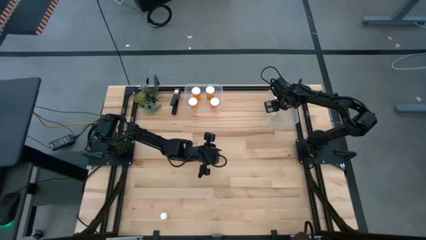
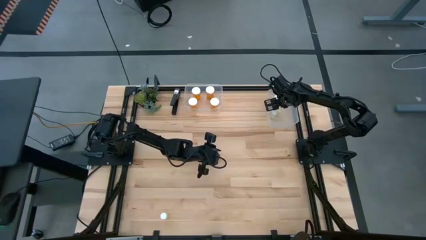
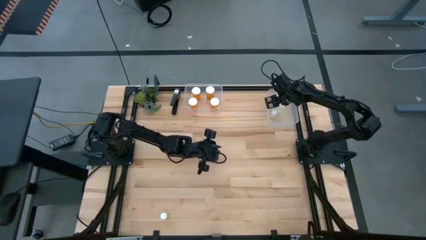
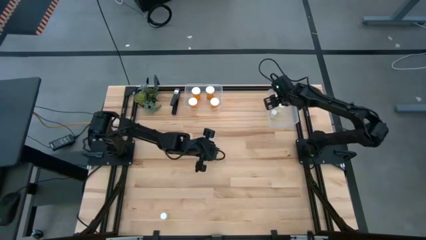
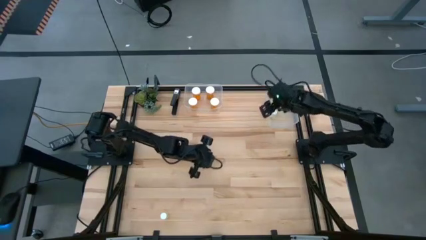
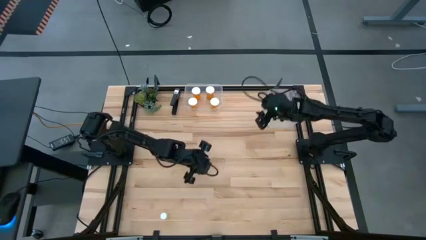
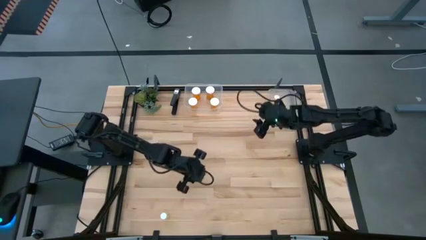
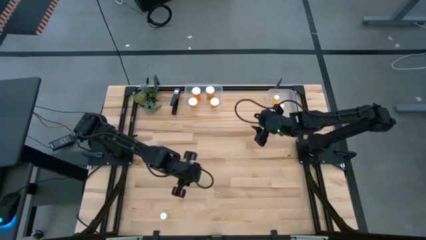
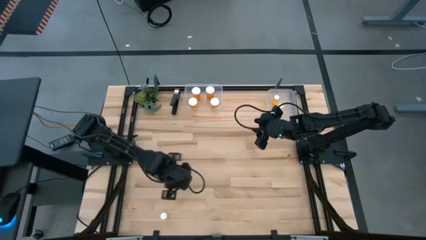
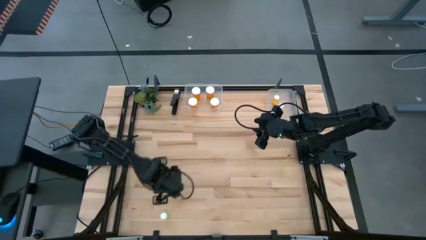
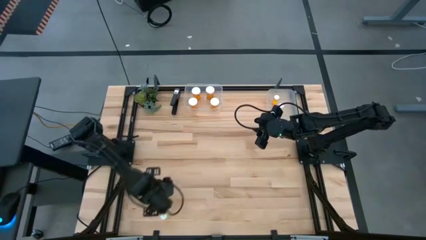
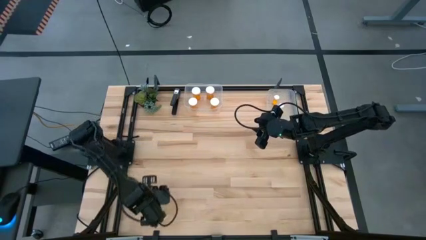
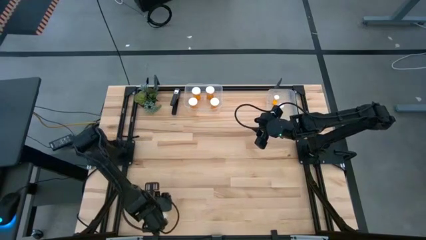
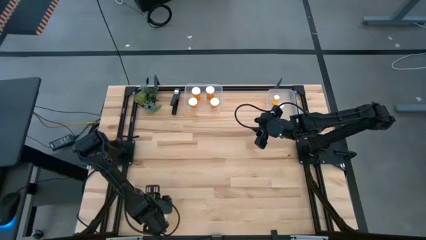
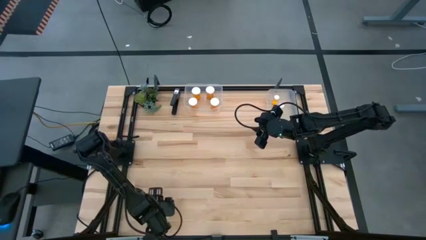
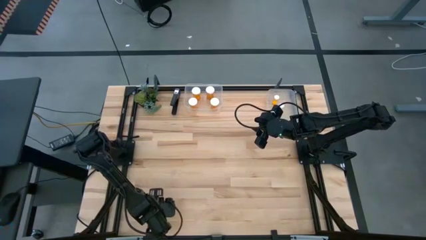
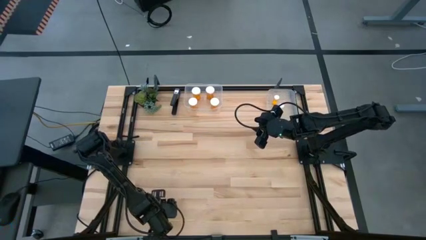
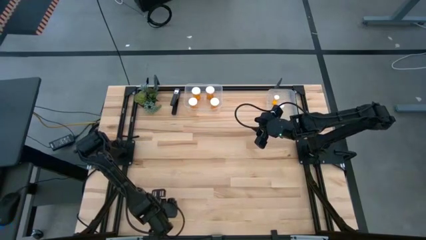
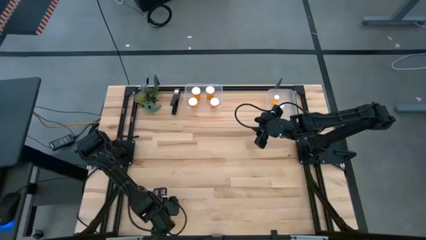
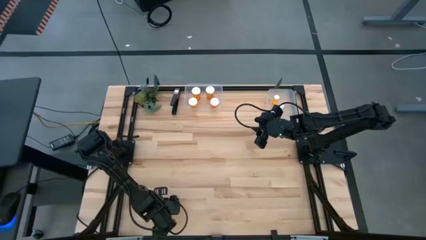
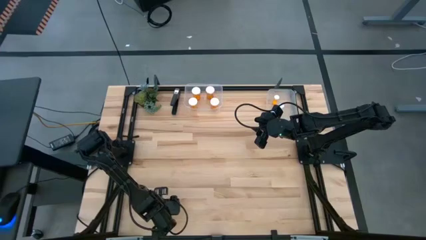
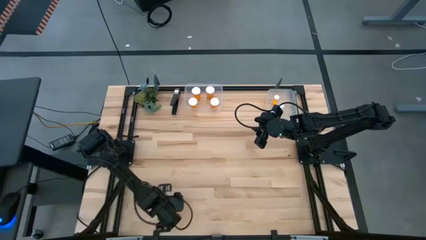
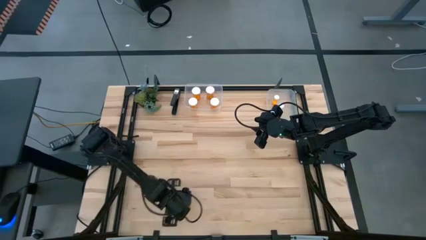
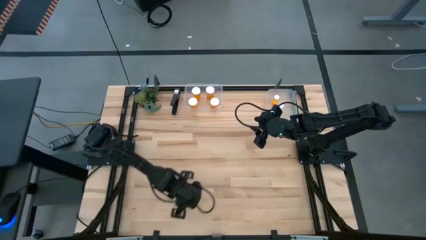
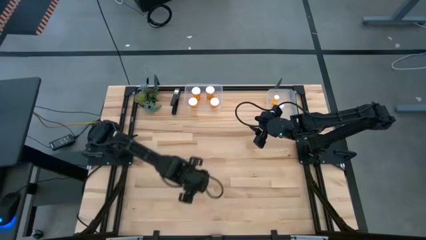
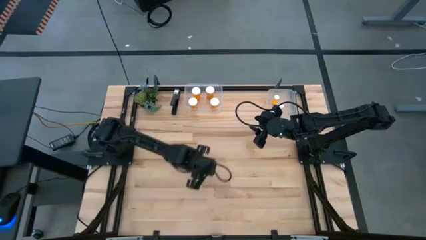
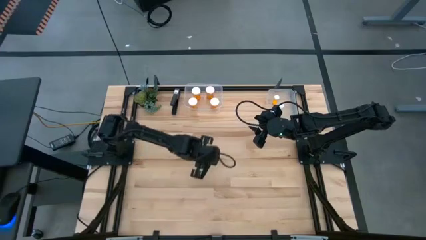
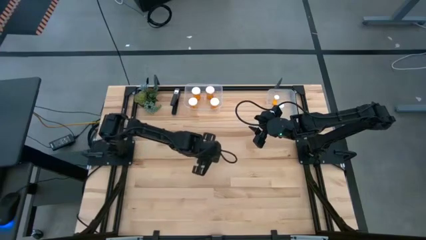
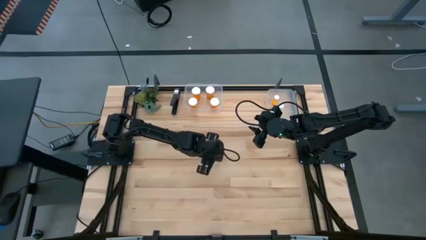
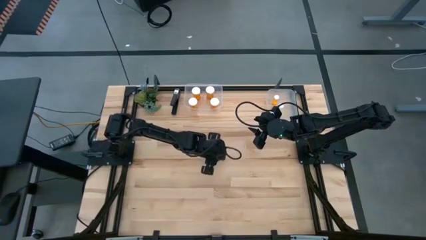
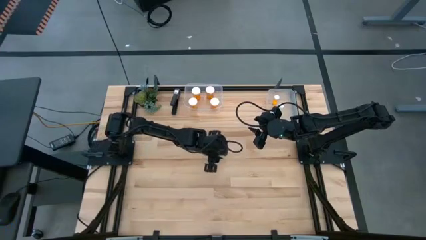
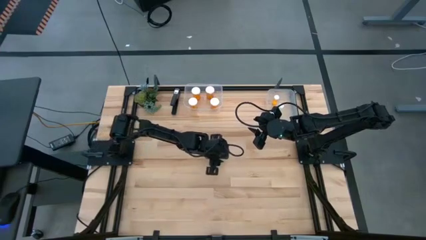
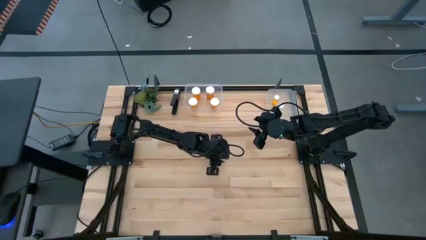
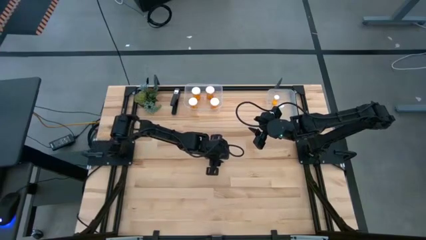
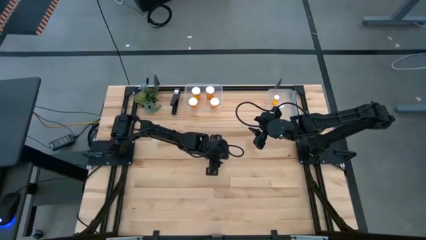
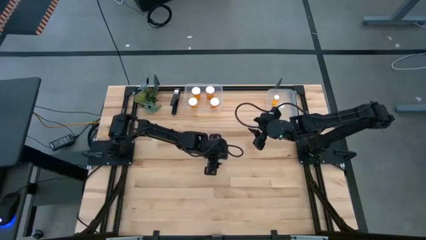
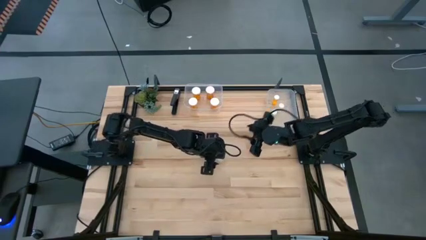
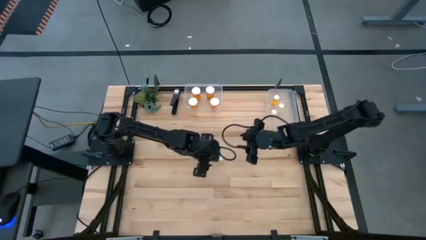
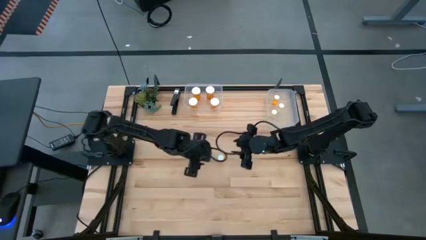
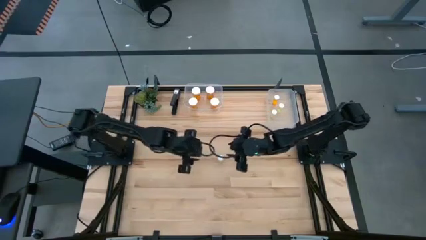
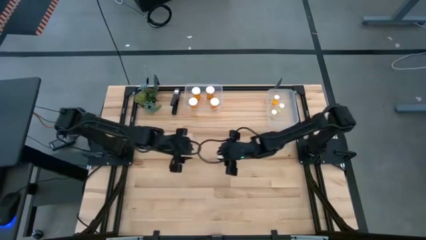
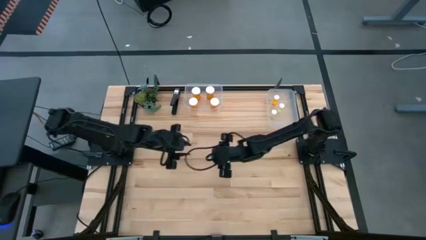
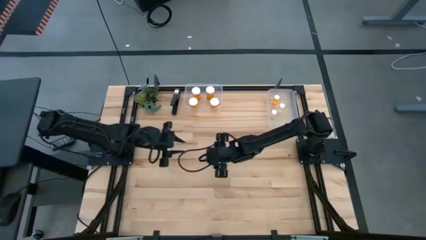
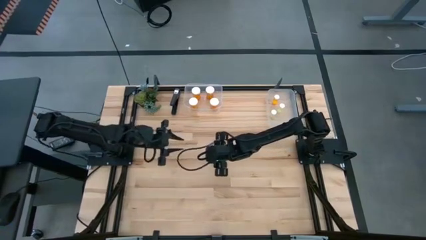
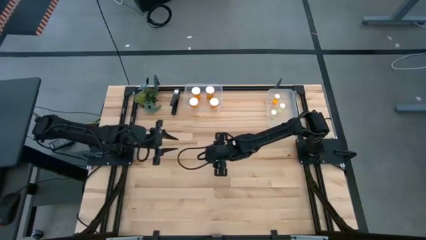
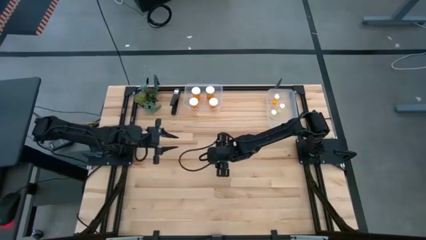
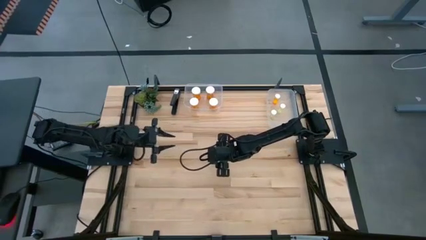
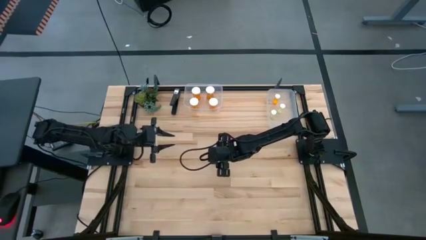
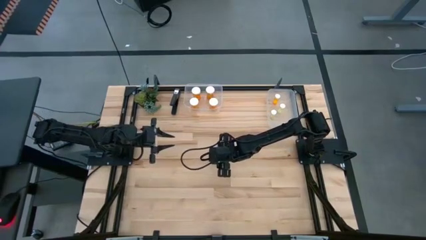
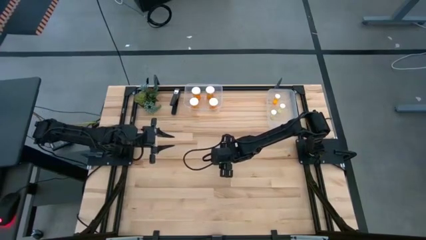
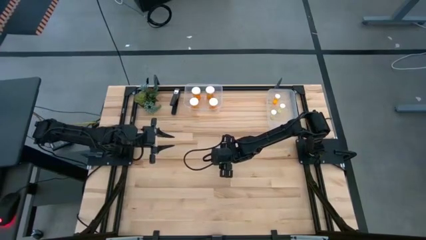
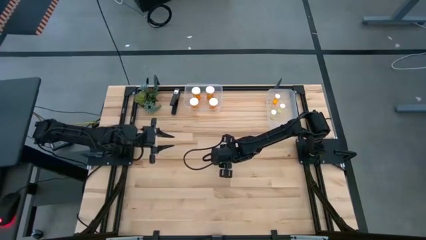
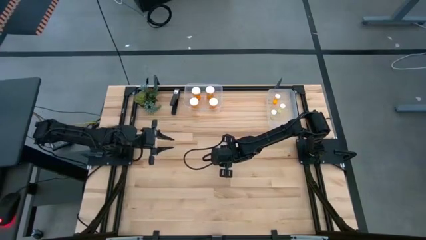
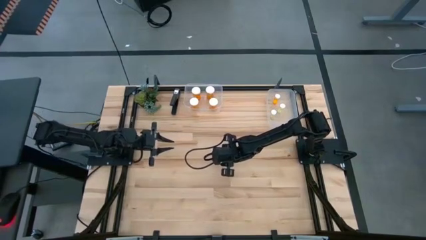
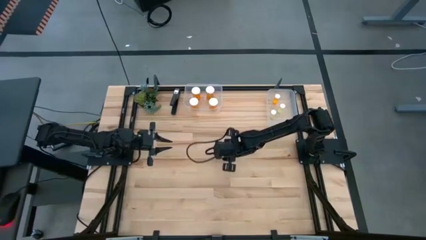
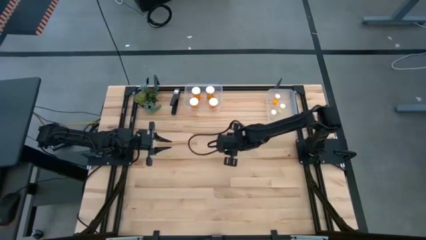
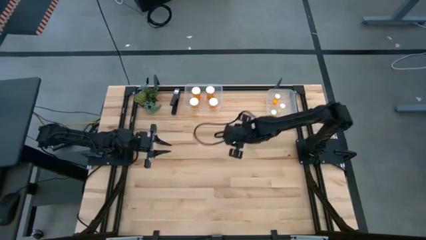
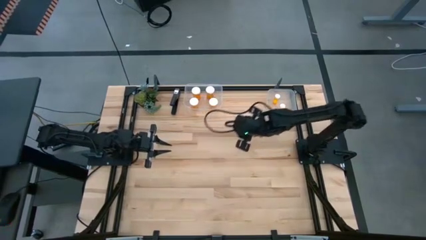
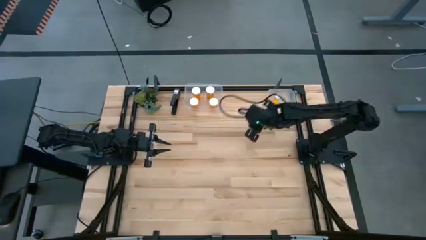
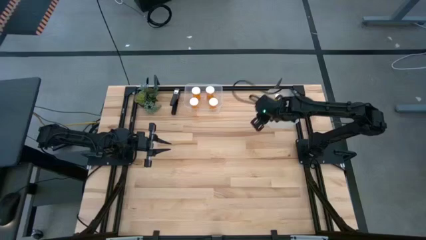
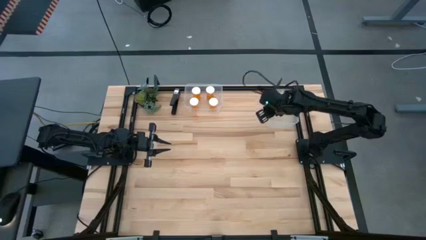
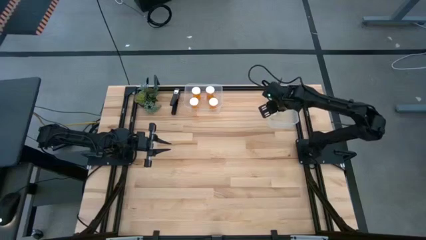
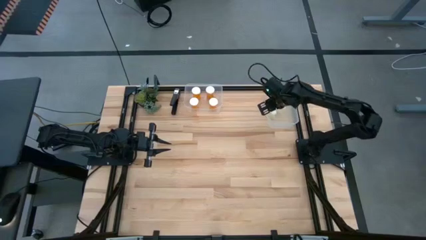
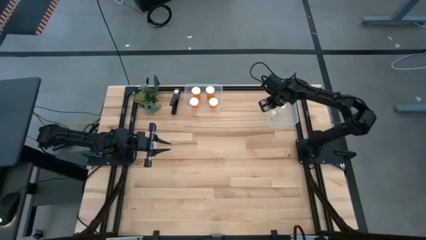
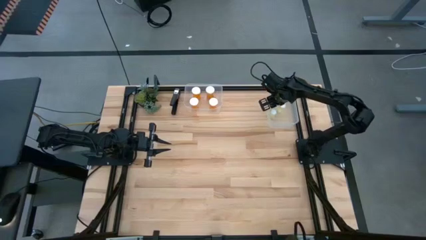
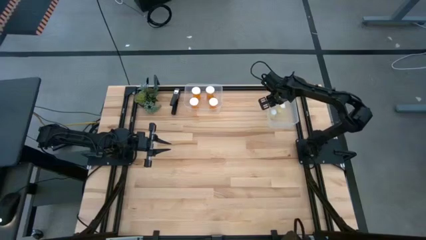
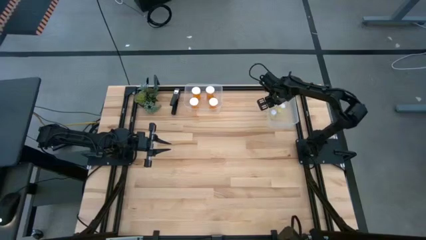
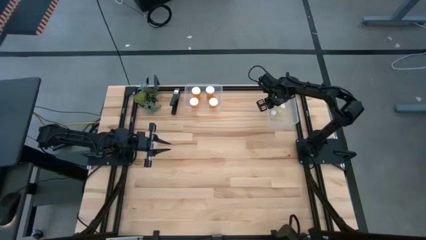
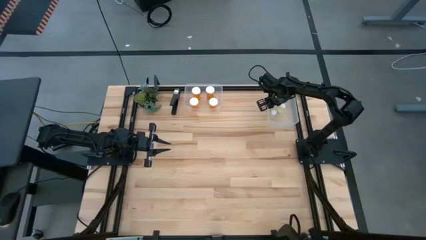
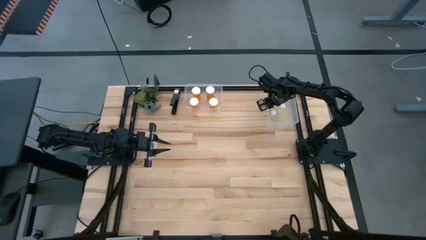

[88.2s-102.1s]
Task: Pick and place medicine bottles into bin by pill shape (circle, oval)
Put the small yellow pill bottle into the right transparent bin

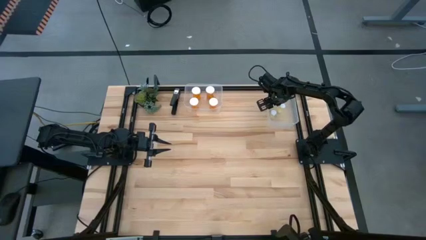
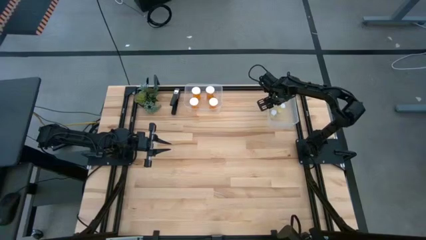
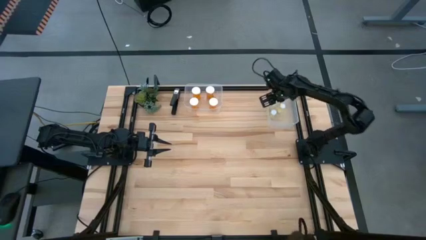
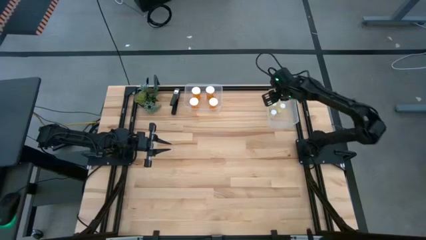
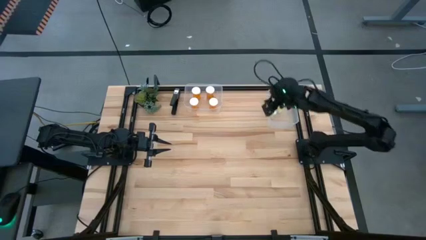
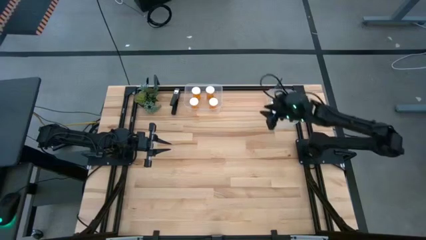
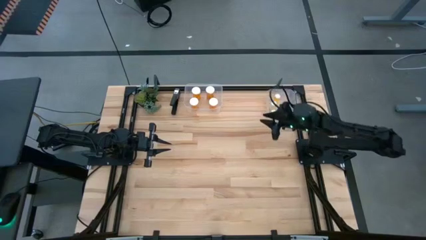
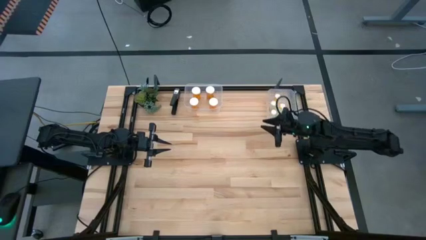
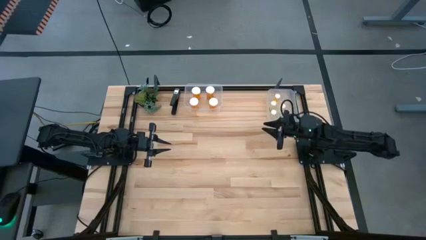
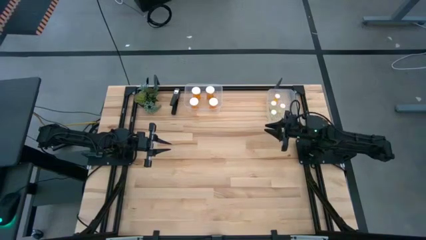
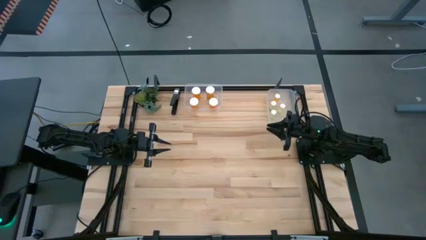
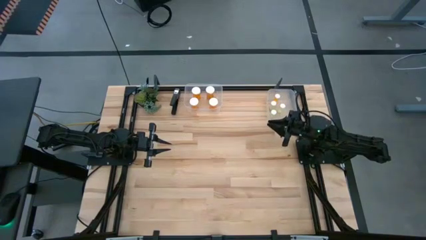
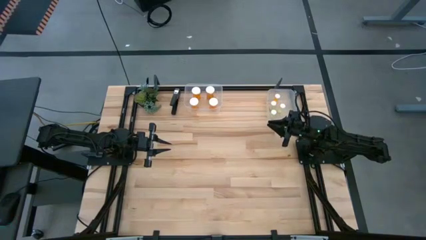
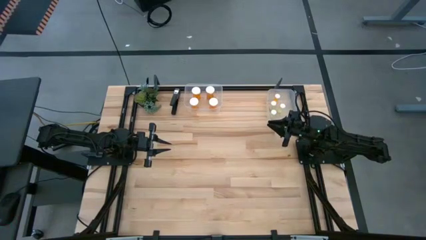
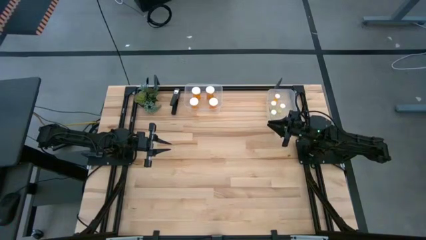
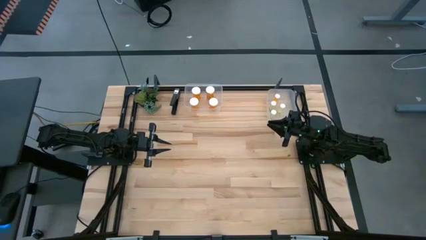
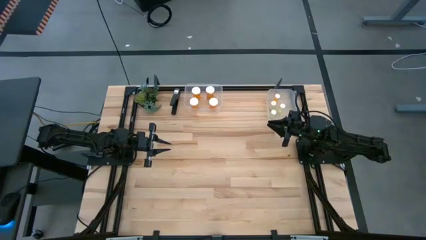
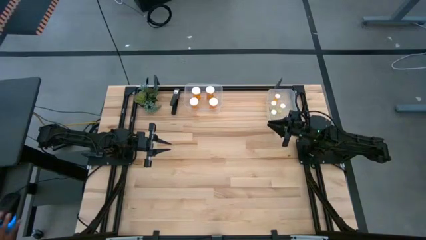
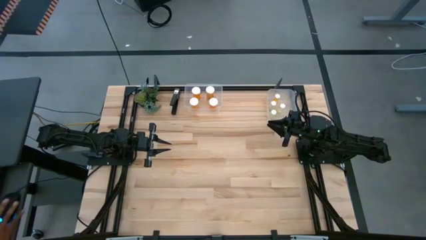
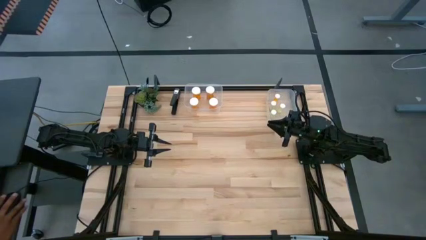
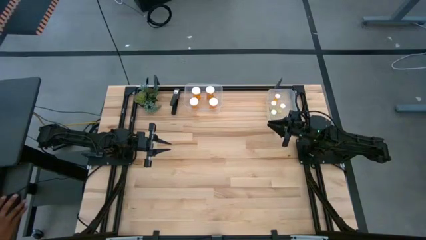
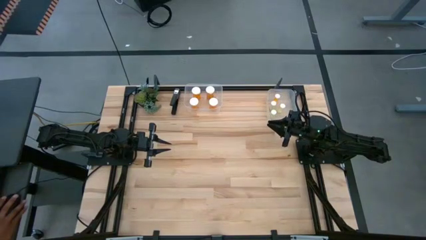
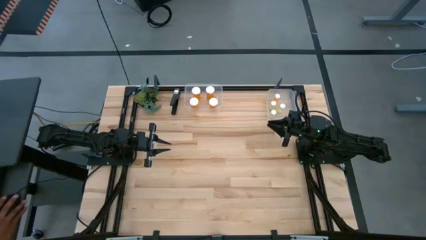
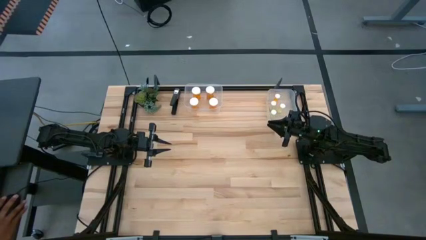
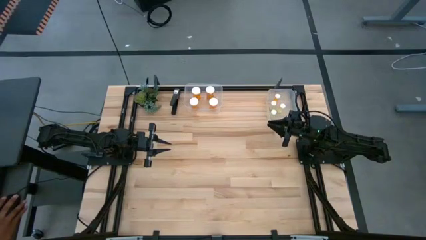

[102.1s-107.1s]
Return to Home Position
